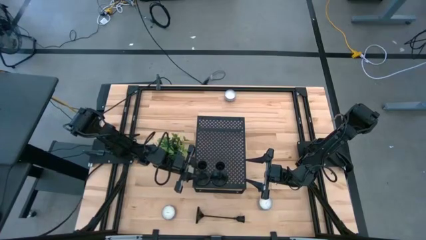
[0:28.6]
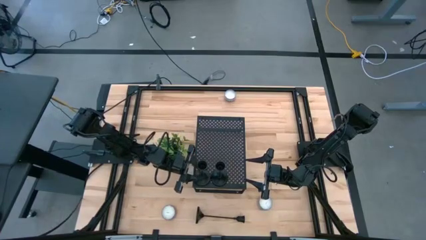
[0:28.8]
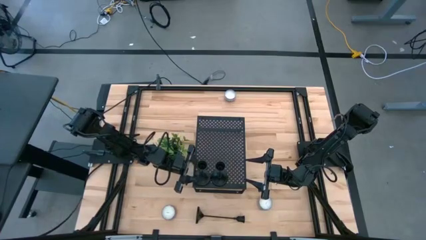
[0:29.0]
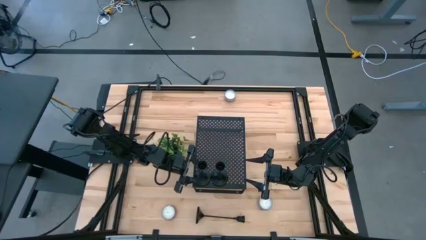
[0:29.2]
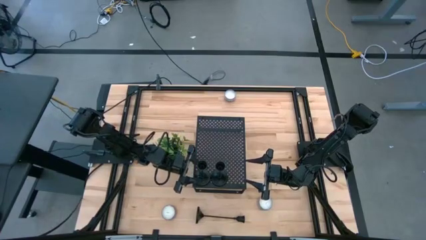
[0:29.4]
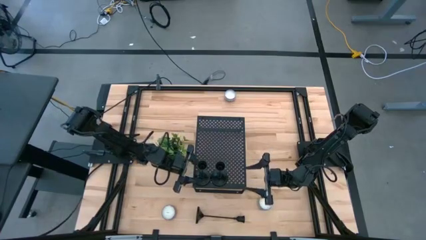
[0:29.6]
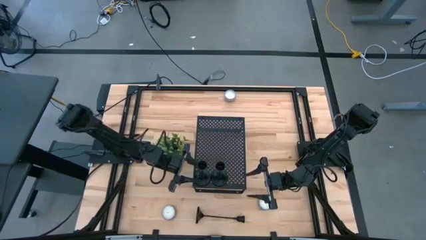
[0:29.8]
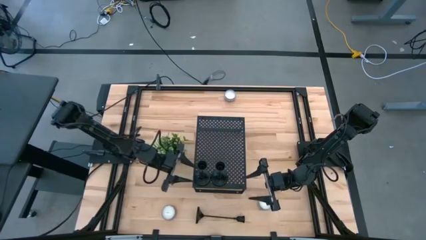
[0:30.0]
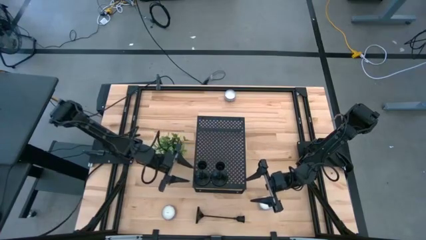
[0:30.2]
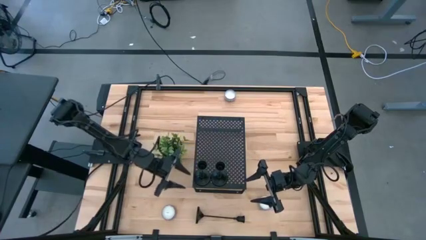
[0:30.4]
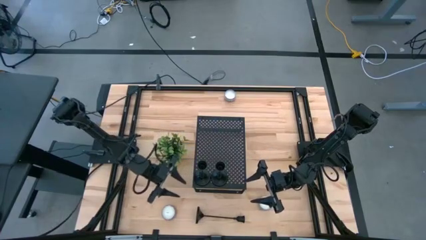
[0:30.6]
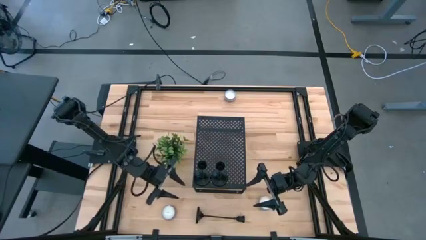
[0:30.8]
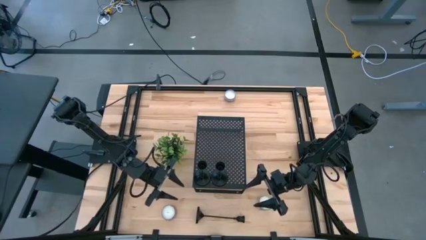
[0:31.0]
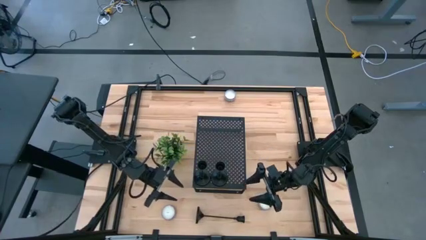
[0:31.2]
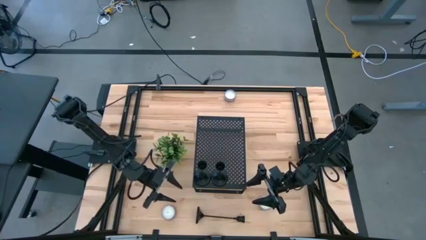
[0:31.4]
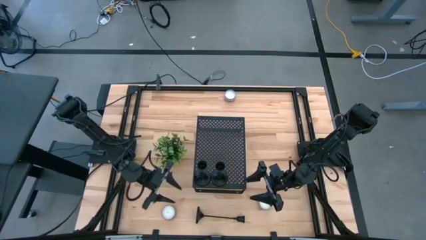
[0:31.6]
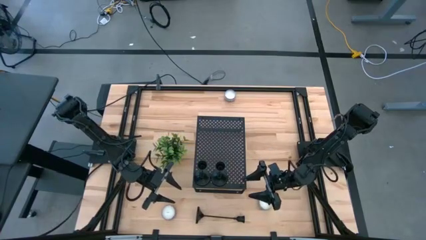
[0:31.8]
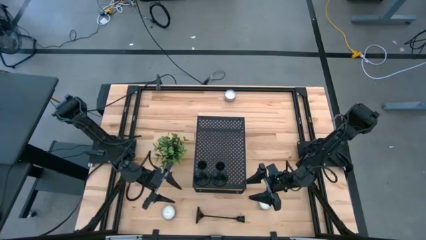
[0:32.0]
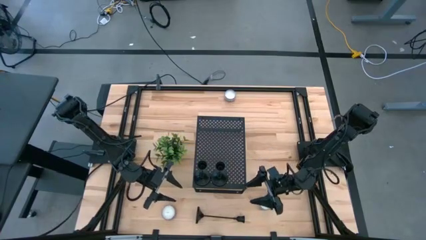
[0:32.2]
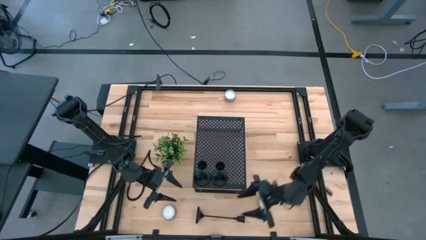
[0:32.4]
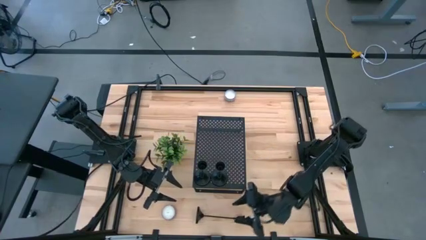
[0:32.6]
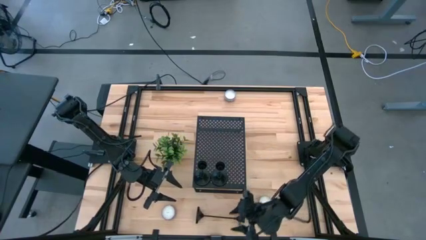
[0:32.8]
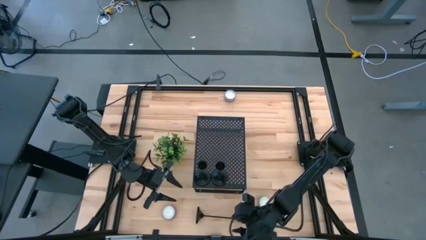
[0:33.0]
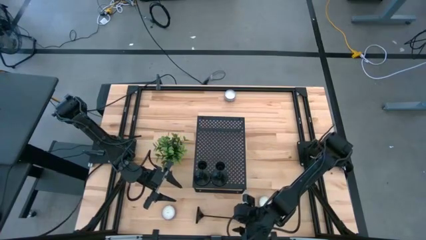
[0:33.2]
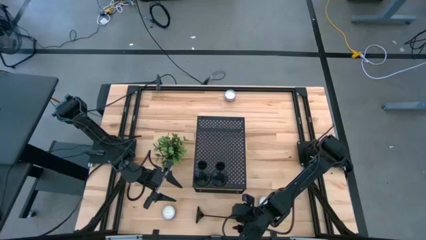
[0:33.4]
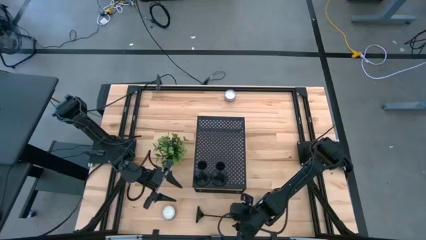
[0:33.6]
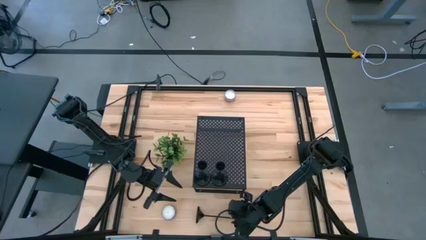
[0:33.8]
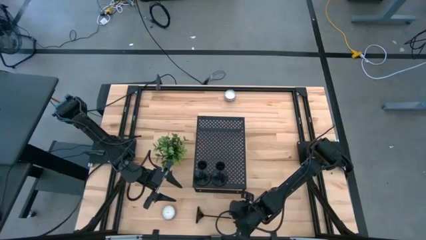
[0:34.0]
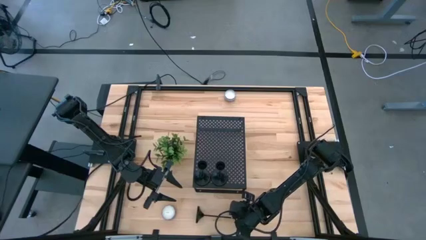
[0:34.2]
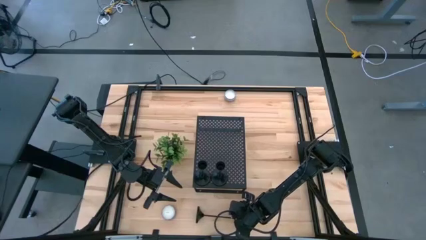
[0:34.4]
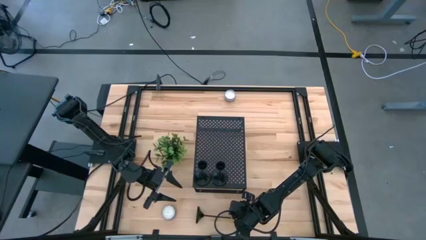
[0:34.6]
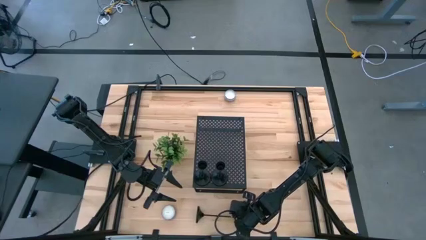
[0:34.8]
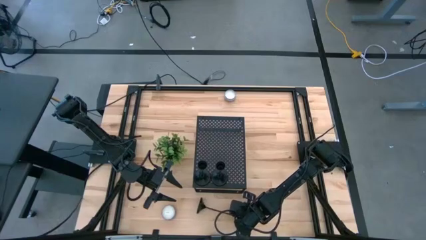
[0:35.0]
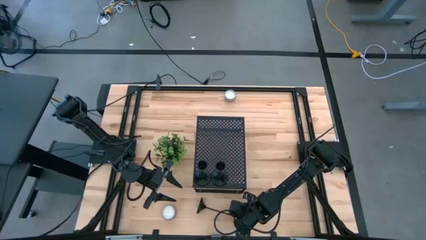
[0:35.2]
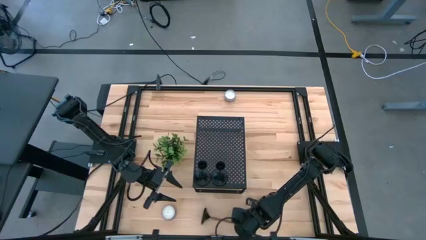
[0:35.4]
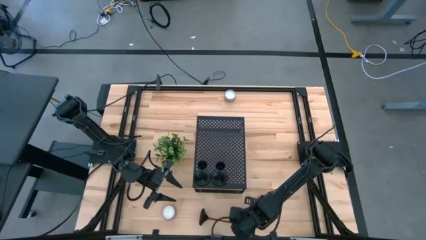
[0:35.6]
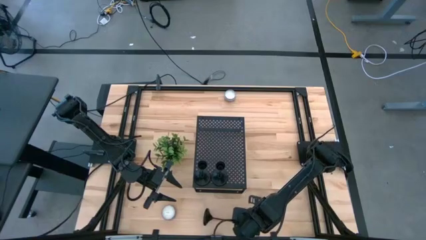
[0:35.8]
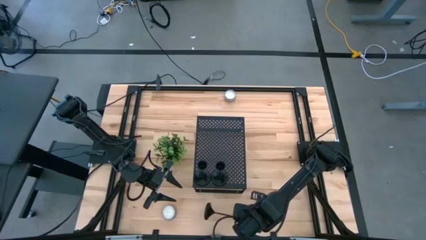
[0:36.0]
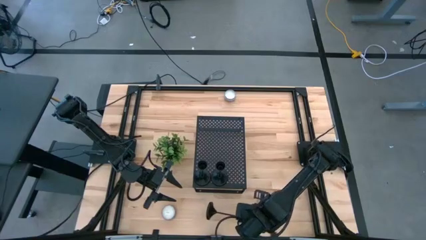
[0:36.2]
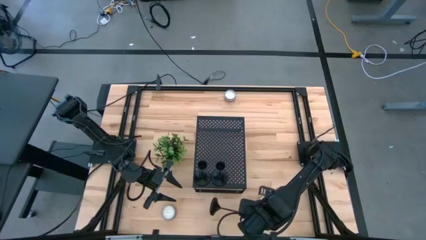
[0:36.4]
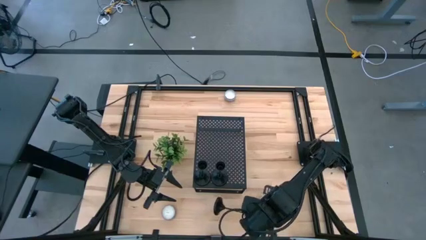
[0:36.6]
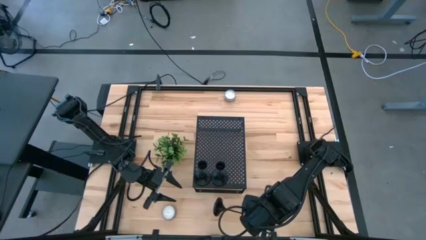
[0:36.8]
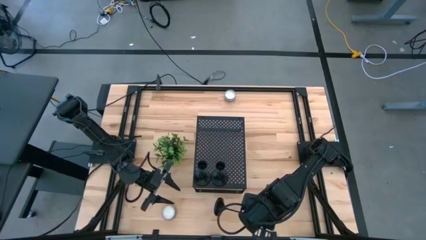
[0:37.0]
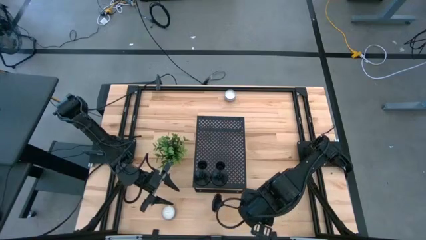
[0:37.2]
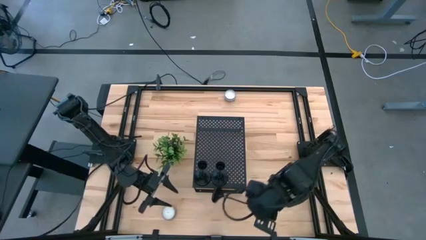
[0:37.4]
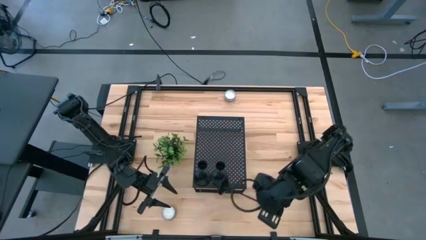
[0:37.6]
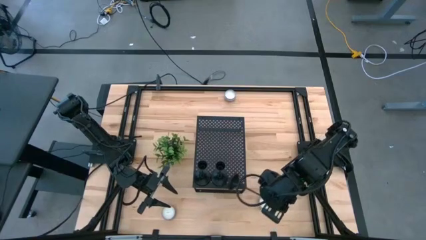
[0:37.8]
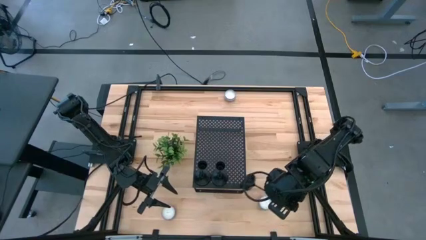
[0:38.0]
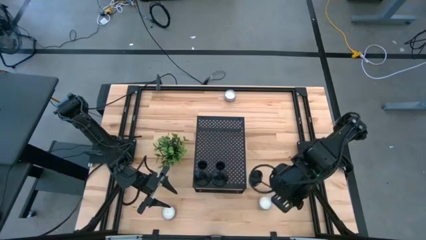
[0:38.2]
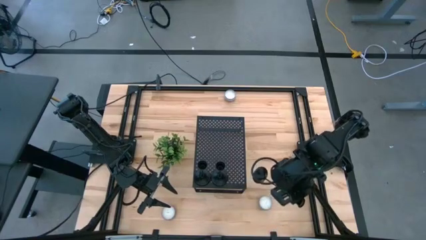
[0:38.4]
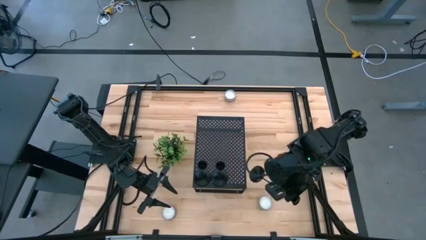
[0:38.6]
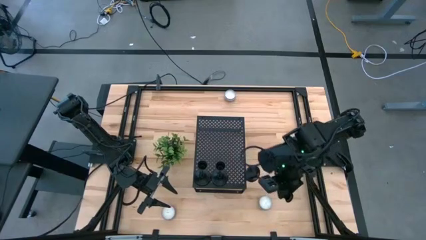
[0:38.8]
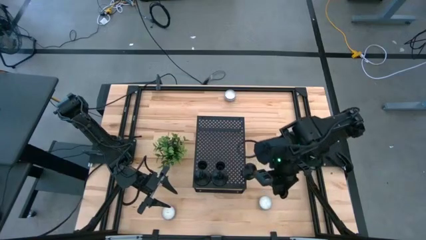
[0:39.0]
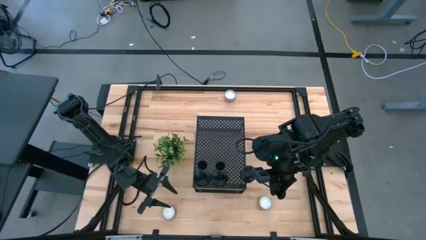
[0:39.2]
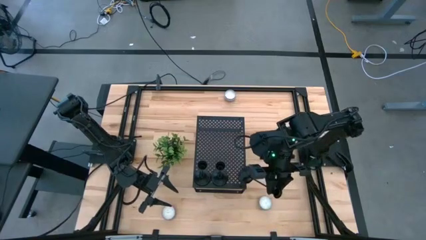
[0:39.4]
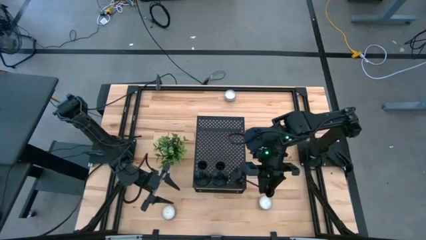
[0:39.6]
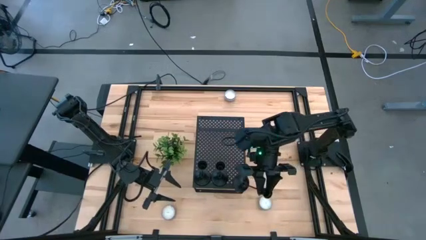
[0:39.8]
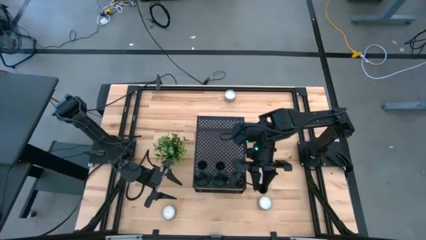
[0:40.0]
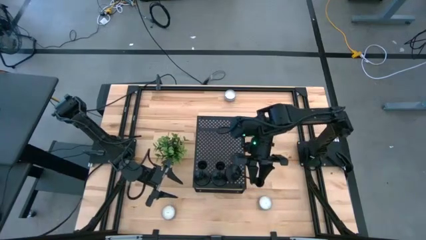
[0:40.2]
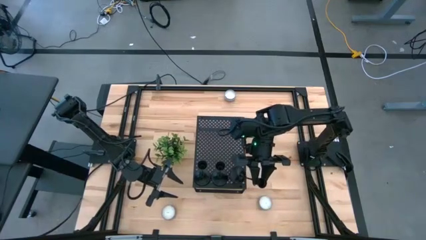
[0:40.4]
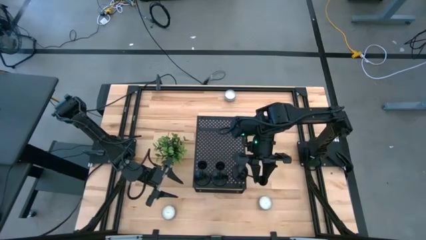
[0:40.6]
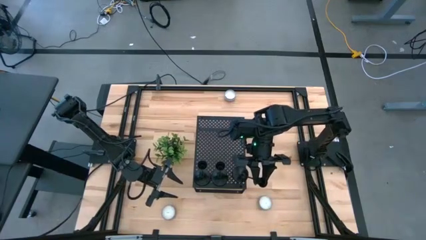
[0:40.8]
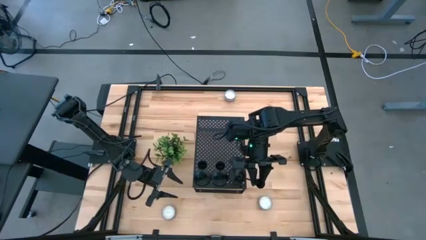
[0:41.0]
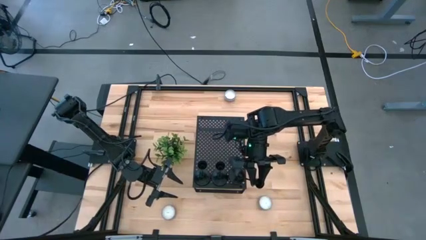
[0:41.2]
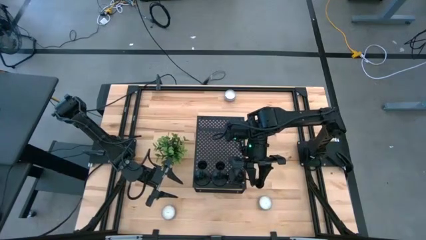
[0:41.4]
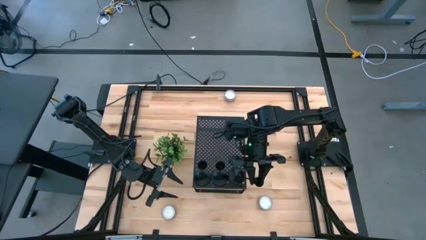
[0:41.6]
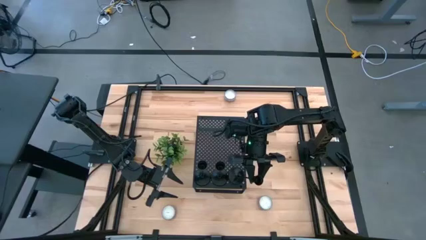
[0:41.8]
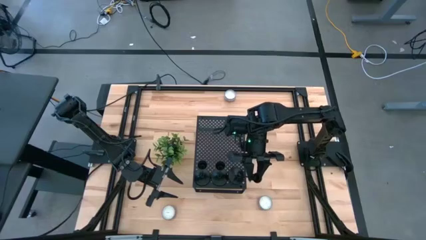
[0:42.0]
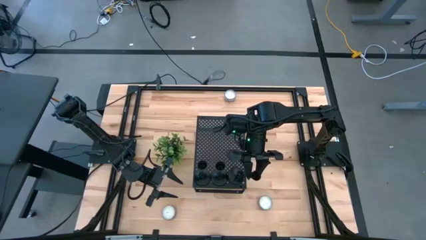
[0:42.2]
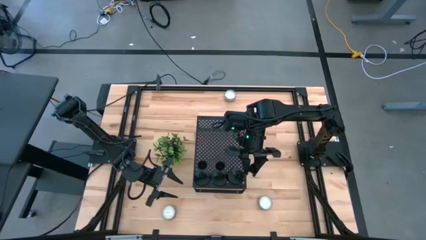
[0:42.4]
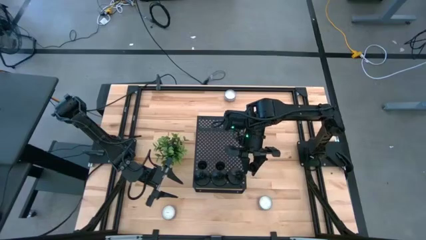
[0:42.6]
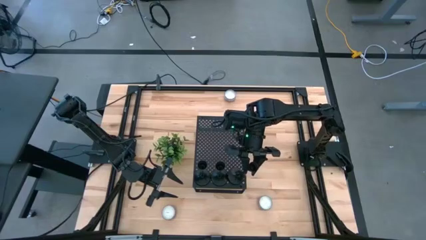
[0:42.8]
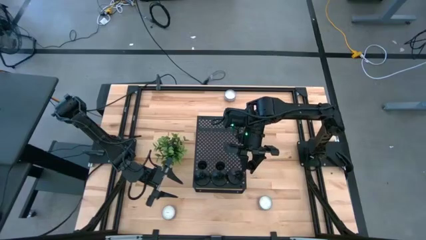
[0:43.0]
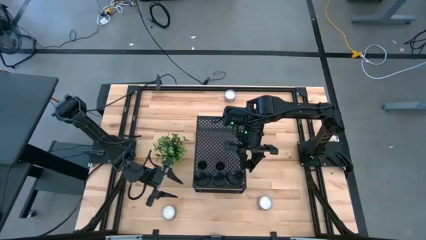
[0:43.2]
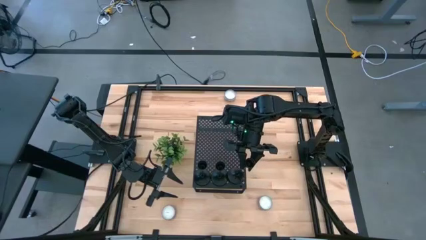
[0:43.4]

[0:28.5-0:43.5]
Task: Pick & Place candle stick holders
Put the black candlestick on the shelf

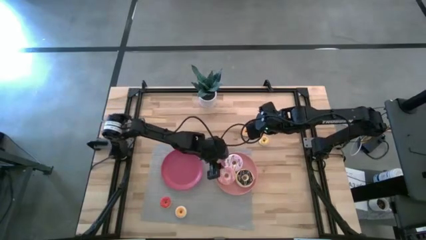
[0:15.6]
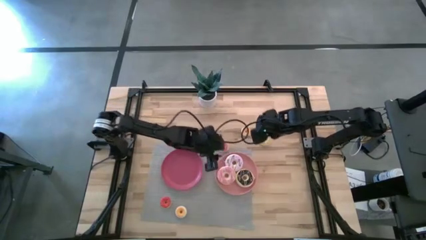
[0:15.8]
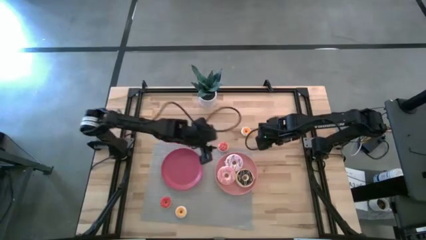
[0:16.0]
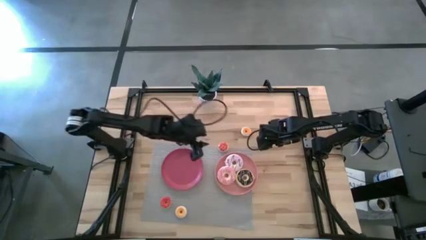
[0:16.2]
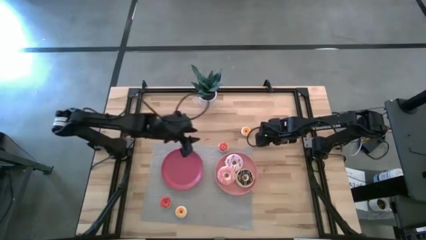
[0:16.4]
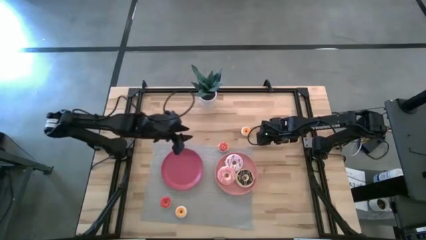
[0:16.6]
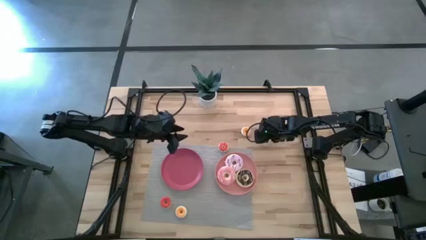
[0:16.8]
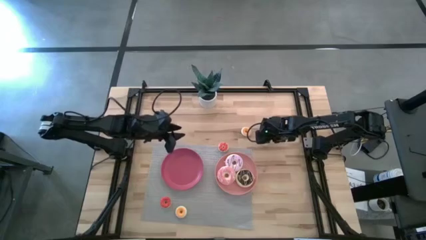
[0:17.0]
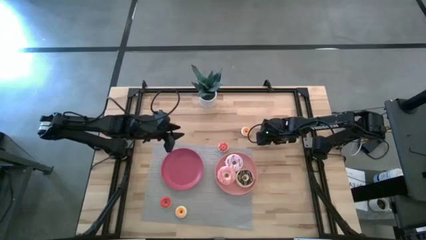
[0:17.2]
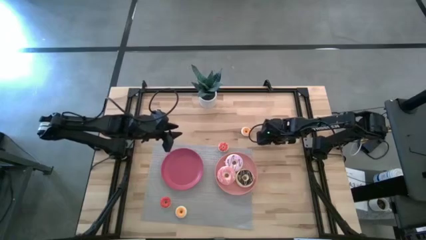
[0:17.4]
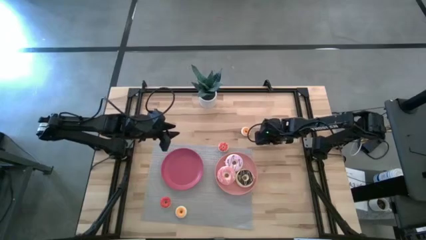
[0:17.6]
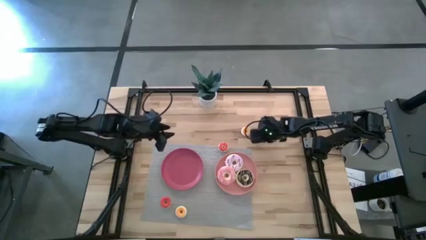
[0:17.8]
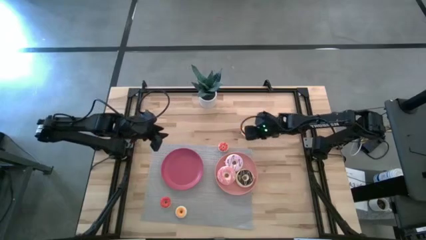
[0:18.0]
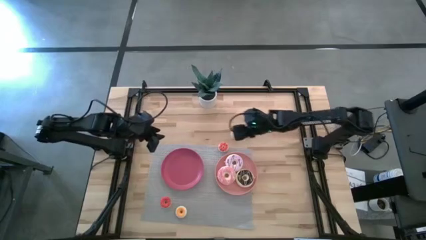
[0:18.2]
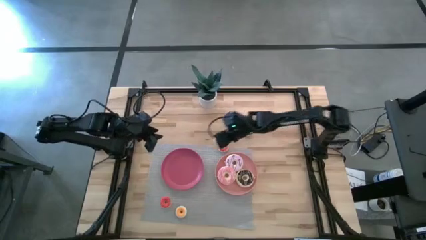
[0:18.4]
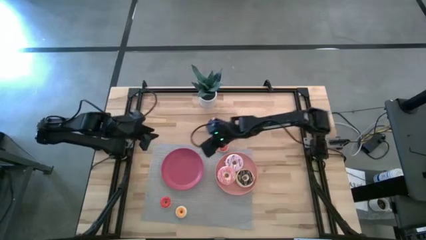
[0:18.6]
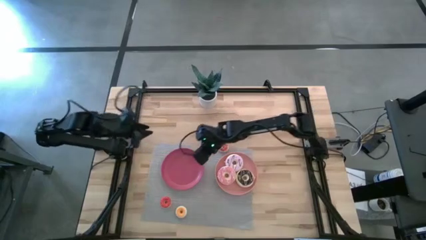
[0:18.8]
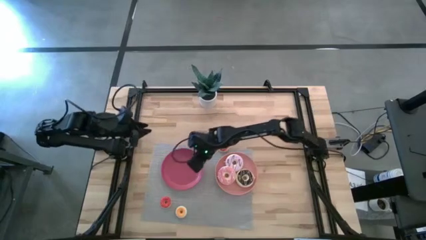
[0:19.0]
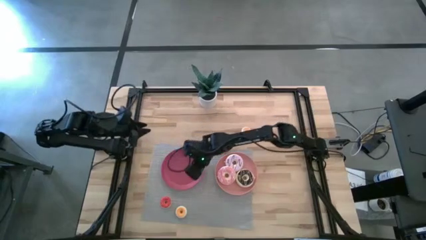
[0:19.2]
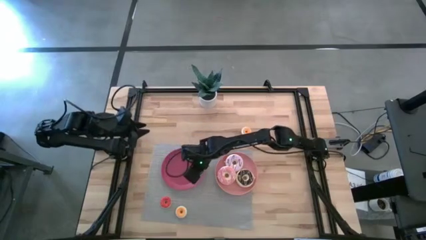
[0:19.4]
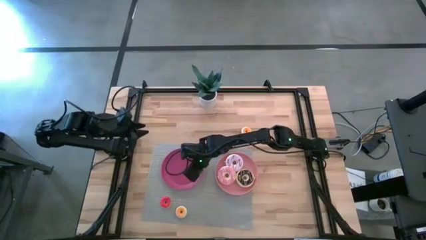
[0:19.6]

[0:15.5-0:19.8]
Task: Pick & Place donuts
Put the small yellow donut on the dark pink plate
